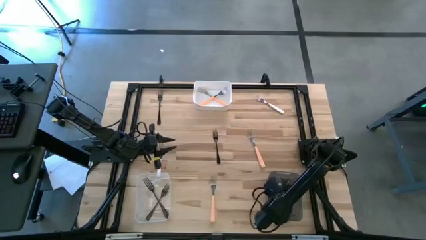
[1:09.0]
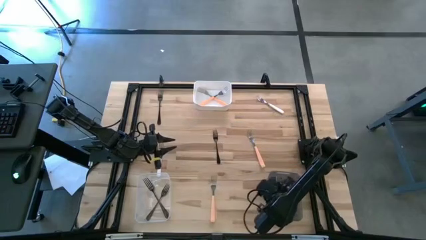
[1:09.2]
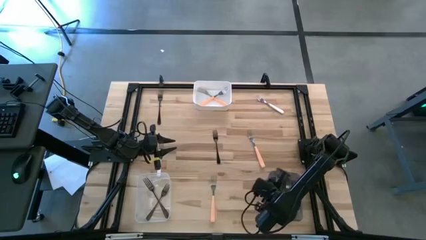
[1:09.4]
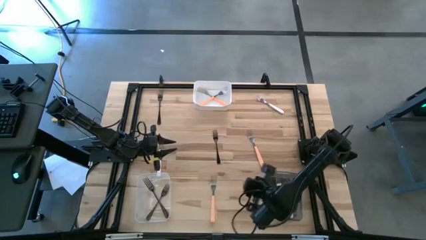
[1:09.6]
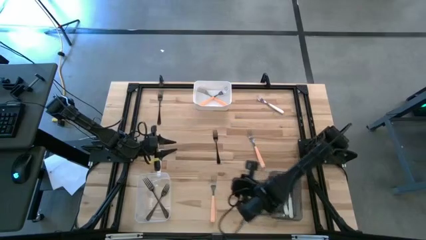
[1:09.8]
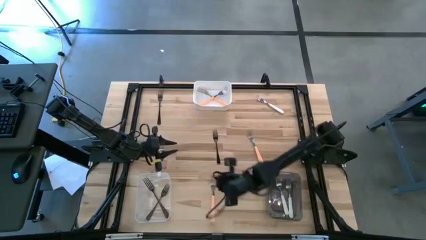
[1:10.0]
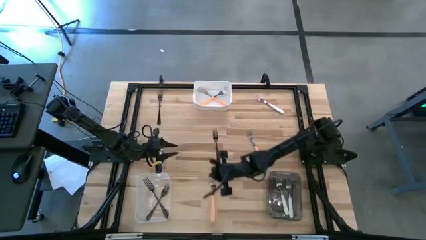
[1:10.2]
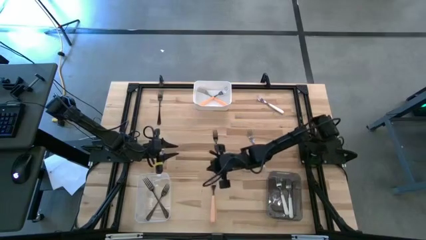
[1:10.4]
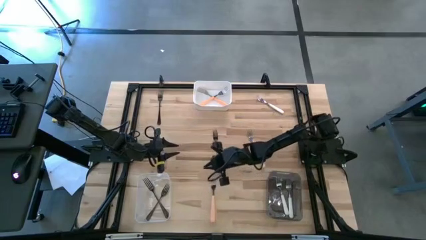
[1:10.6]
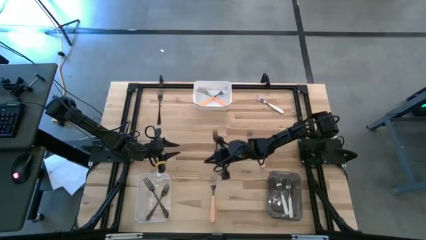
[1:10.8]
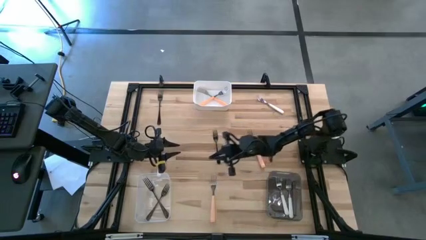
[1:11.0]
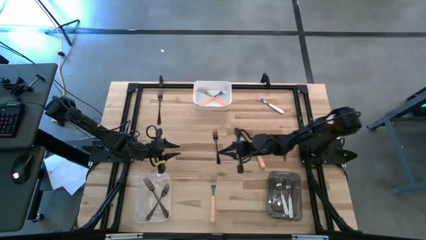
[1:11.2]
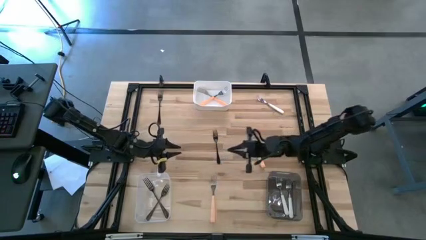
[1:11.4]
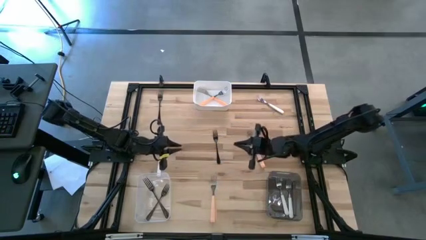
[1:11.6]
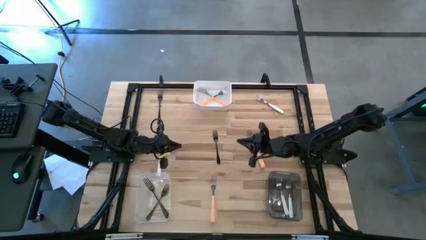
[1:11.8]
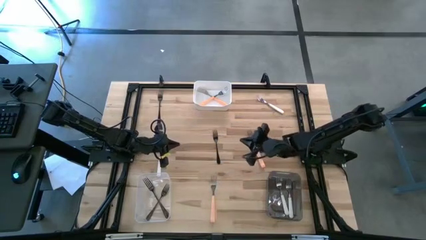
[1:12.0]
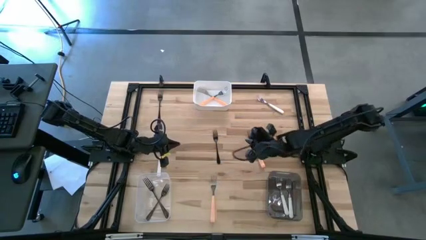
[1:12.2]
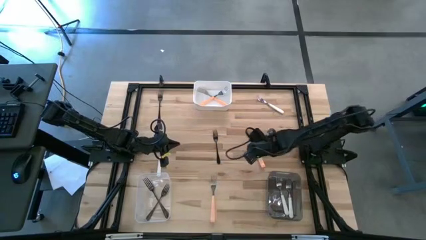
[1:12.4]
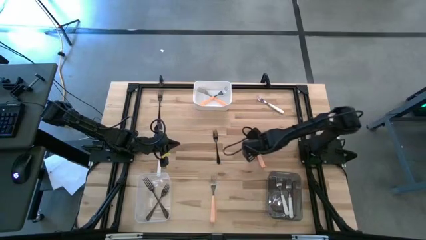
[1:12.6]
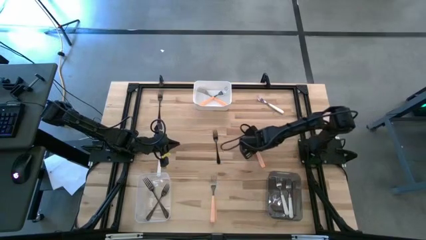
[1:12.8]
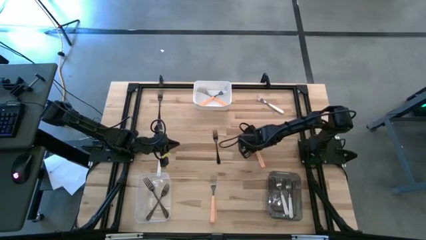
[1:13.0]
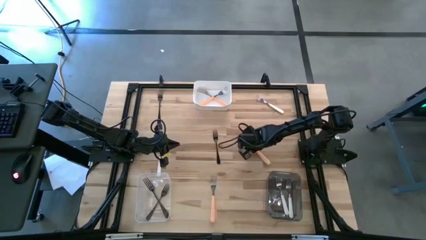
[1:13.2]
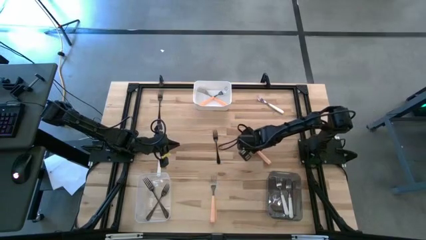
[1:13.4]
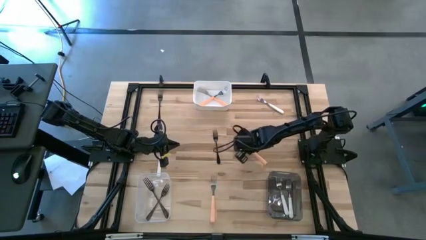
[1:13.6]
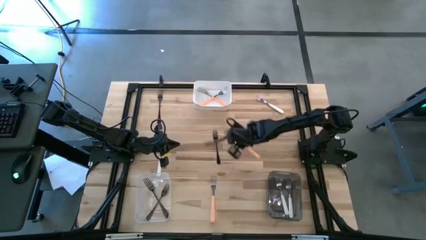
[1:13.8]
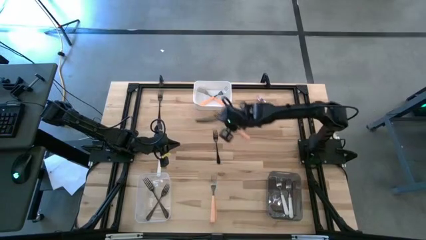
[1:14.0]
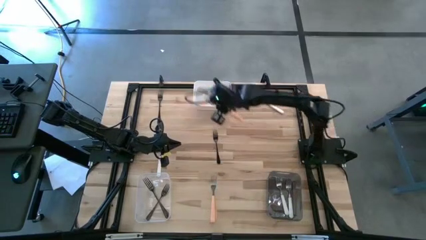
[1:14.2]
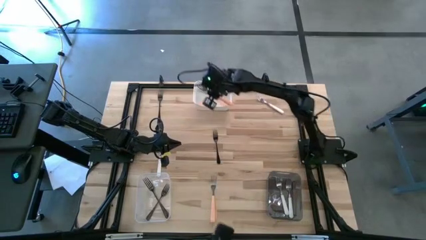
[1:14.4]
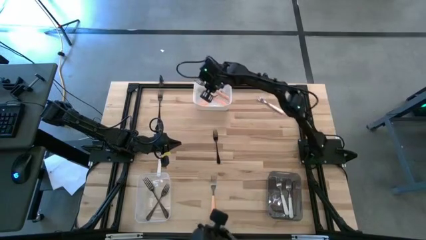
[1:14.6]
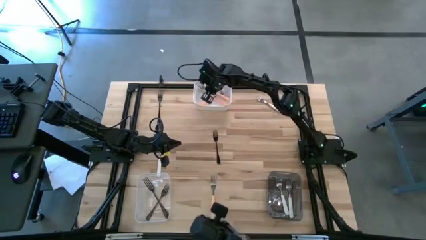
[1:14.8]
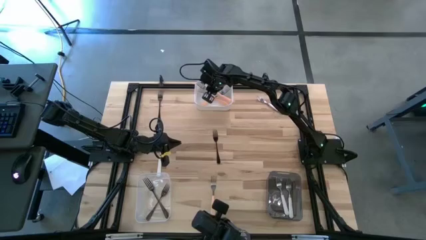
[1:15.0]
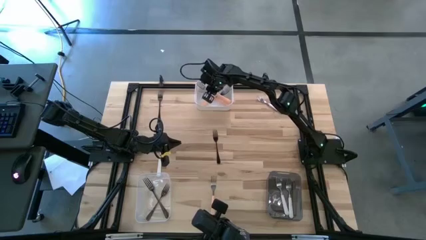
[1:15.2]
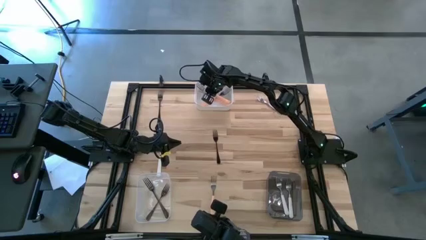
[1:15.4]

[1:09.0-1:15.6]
Task: Sort silverware by color (type)
Put the right orange fork into the white bin

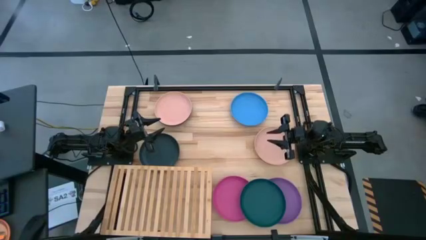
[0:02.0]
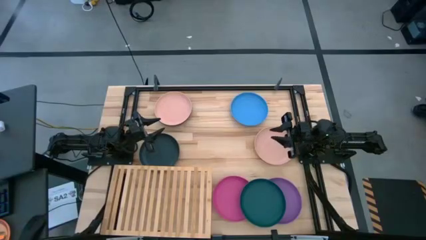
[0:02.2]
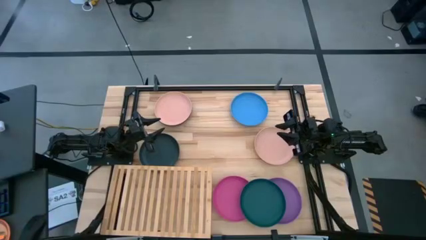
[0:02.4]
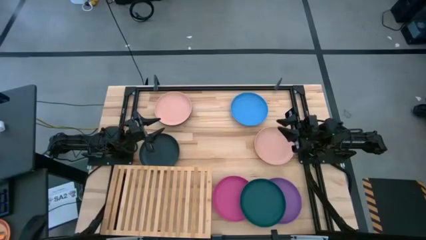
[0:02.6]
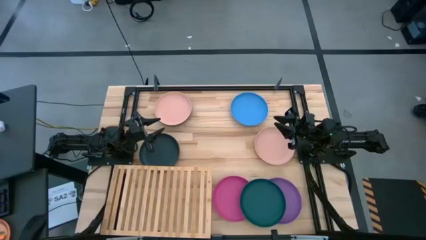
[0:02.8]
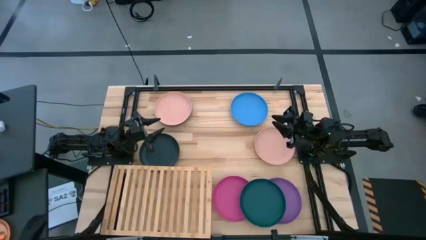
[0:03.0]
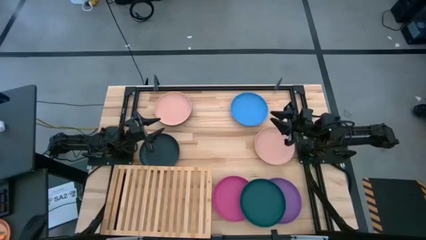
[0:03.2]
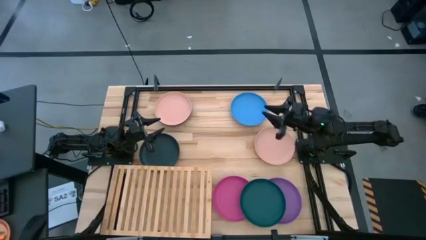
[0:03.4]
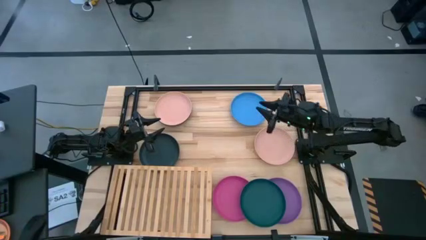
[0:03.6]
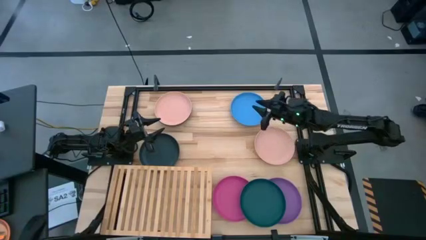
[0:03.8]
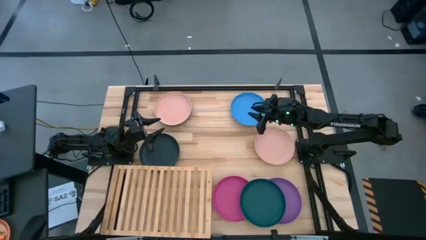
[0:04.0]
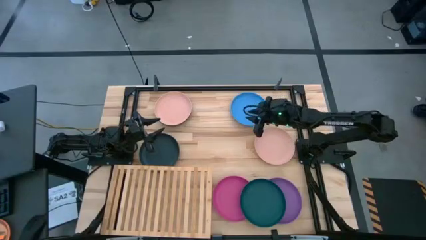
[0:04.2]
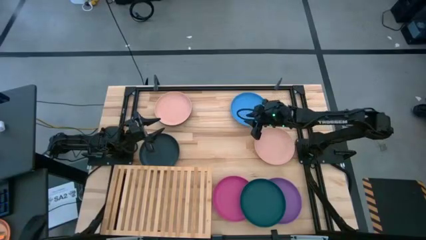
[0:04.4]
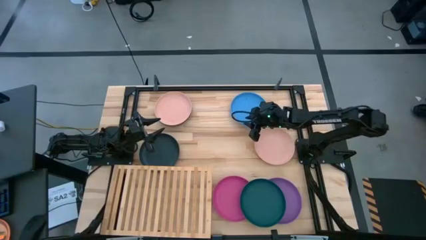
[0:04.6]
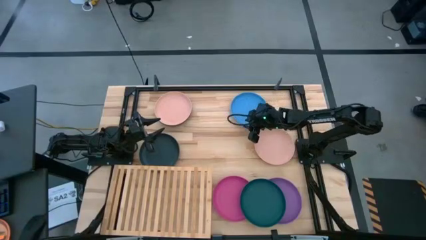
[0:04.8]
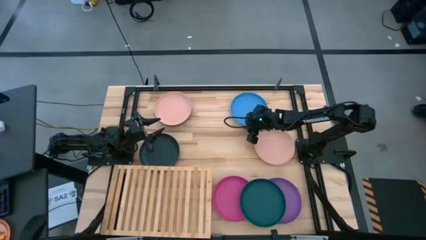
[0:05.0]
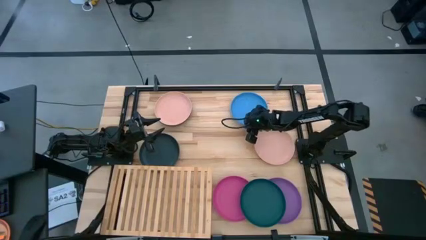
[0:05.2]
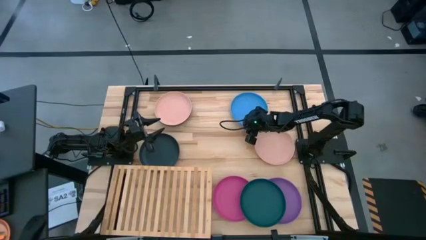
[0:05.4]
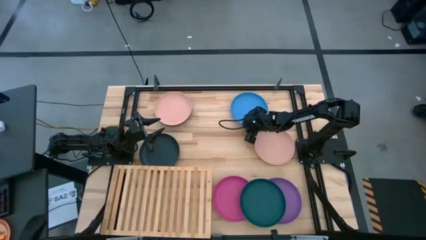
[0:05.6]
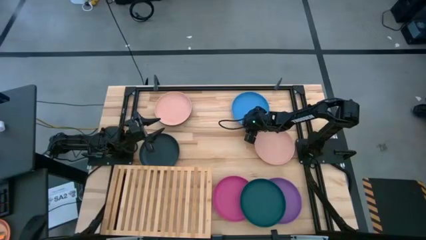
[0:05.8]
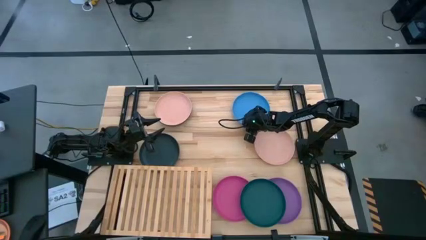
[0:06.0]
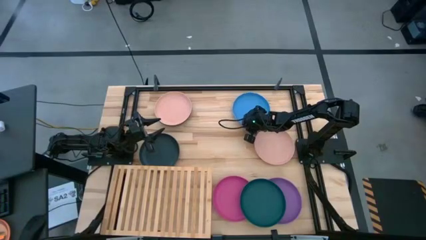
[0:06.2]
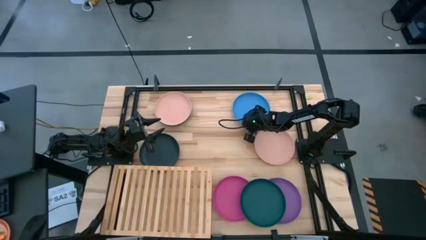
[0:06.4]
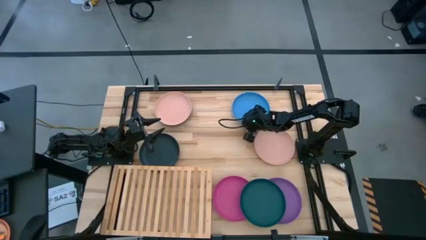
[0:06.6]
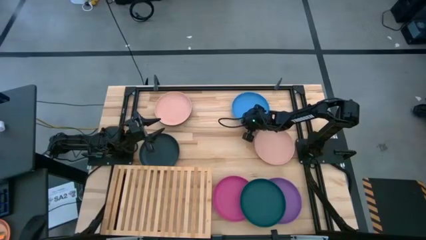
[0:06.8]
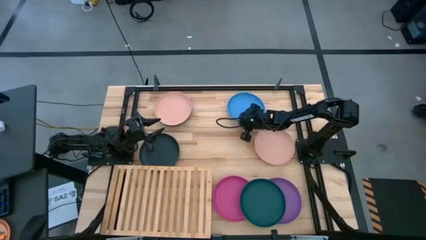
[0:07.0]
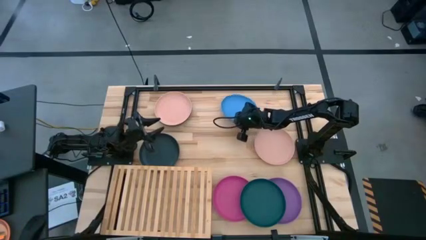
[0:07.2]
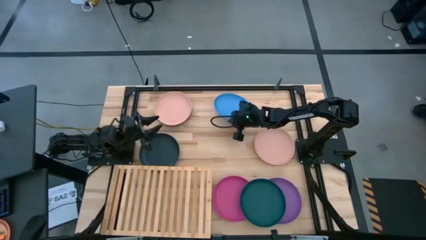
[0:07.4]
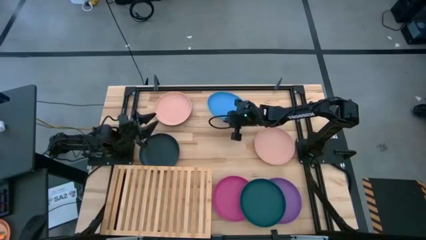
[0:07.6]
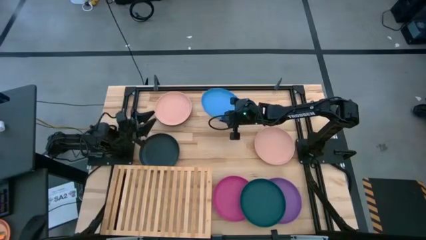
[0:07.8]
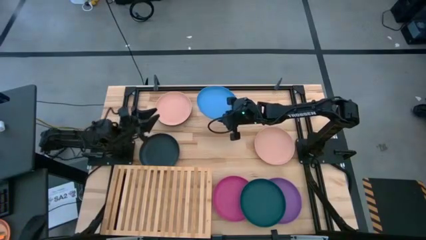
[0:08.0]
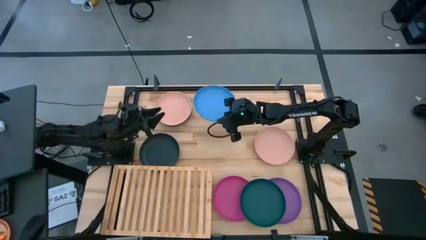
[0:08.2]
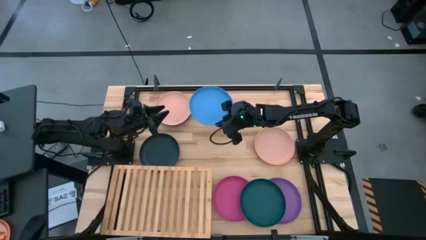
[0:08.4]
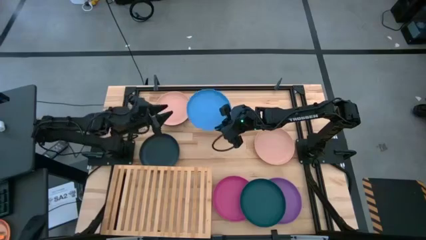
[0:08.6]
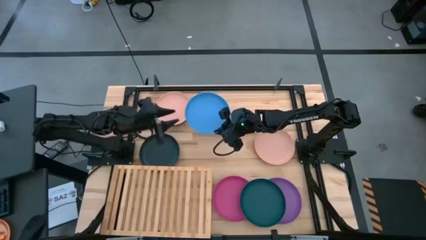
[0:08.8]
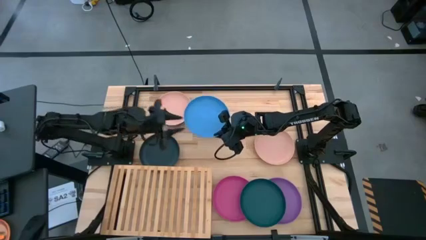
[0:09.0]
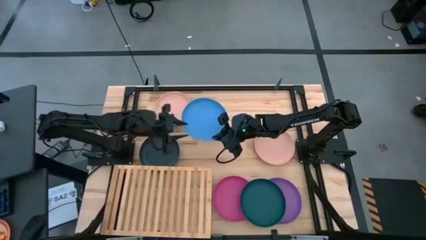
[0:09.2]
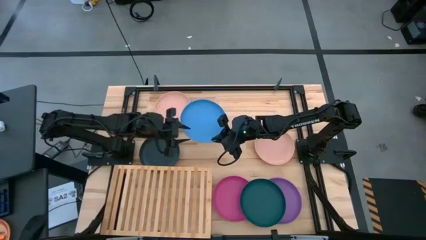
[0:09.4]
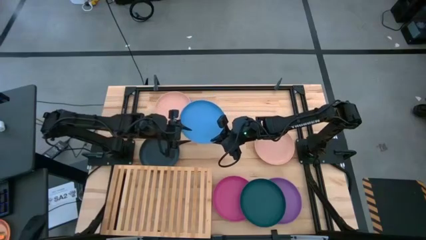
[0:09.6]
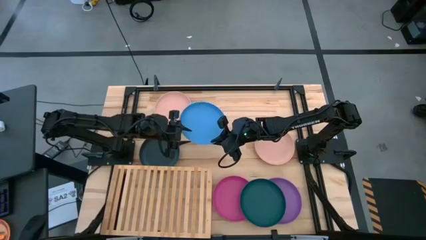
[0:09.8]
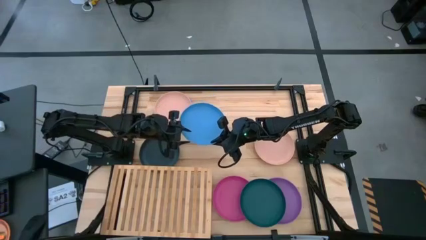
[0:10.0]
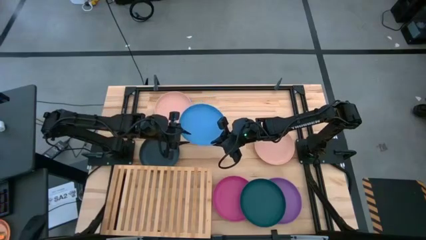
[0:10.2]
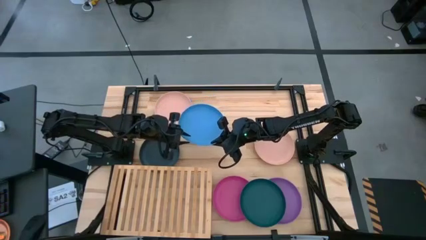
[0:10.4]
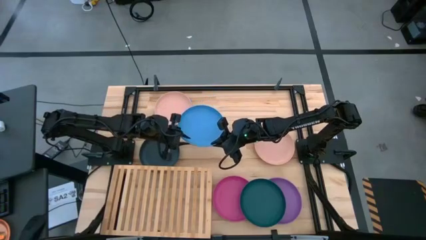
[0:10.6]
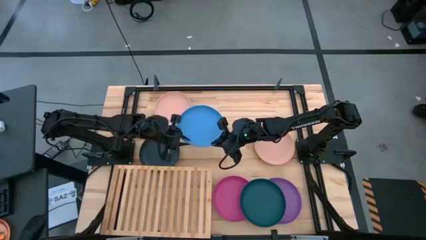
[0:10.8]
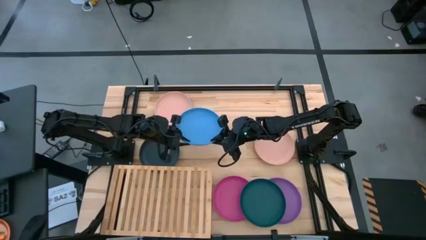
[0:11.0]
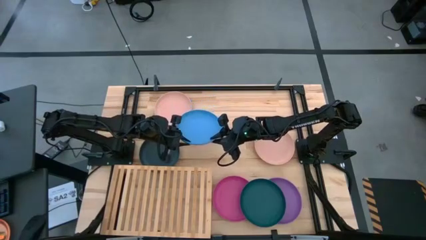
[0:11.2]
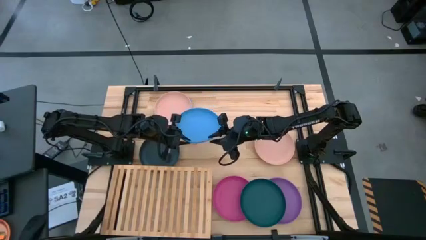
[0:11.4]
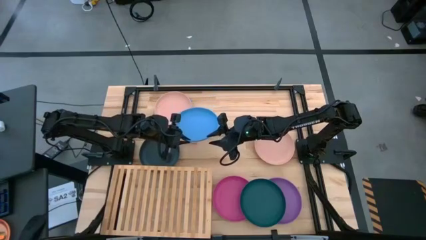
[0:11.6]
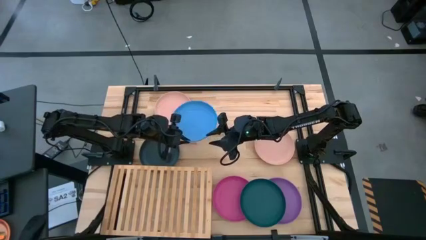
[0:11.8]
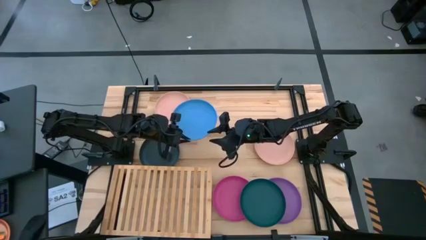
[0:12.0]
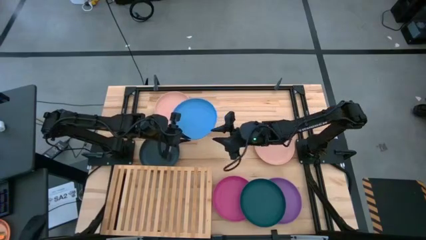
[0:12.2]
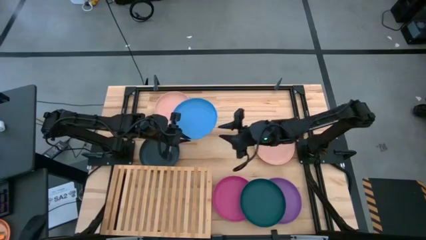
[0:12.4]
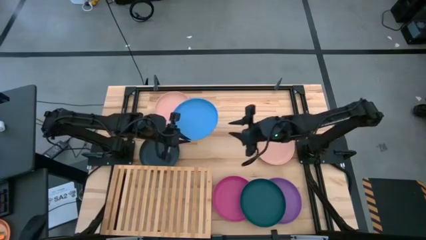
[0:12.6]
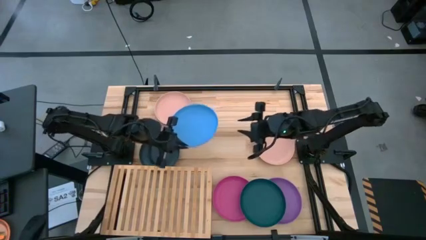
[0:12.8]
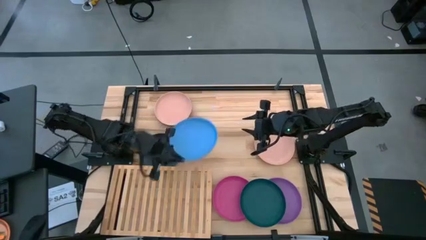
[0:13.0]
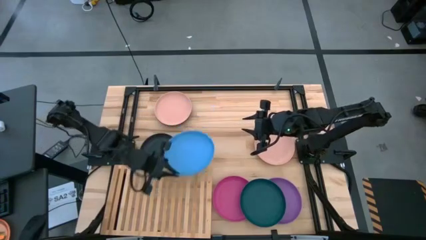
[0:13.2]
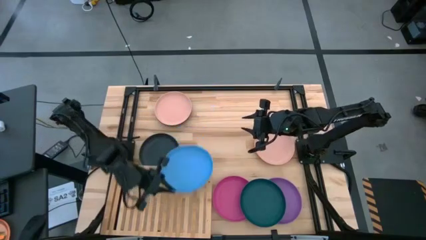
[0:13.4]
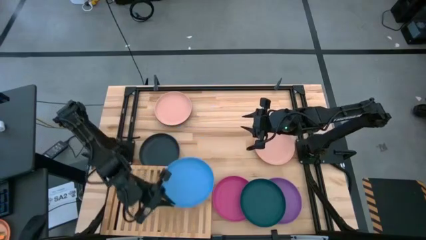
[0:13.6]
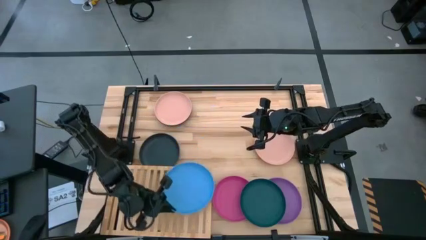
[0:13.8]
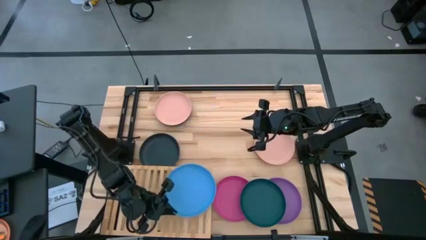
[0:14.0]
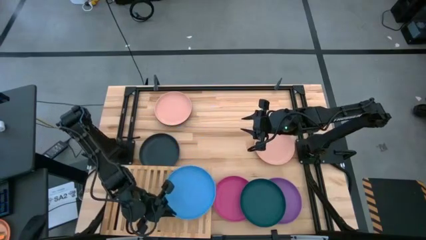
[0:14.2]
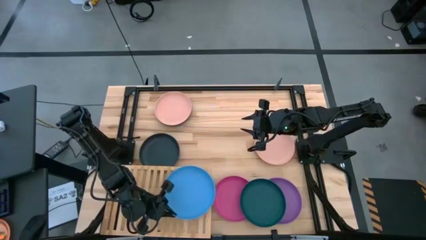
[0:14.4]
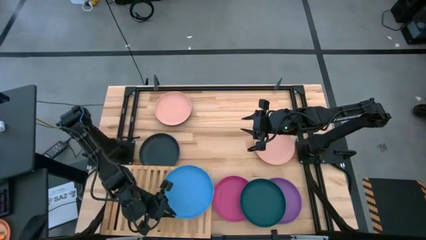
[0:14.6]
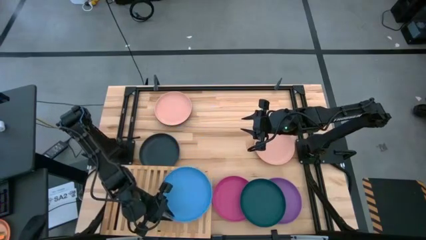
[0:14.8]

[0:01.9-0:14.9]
Task: Place and stack plates onto a shelf
Put the blue plate on the shelf
